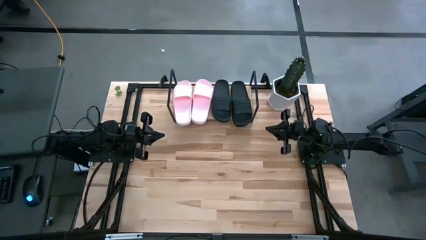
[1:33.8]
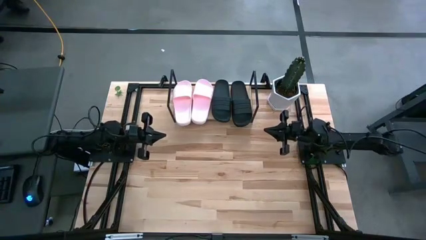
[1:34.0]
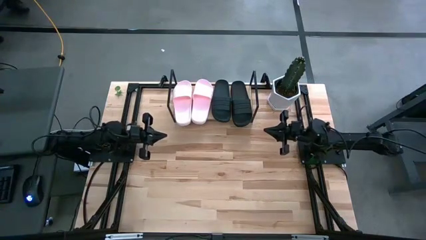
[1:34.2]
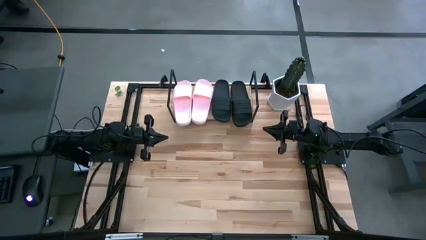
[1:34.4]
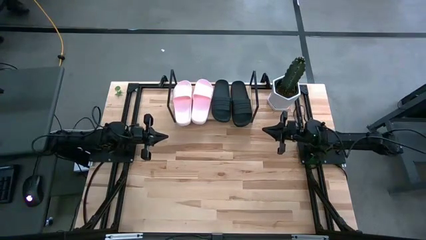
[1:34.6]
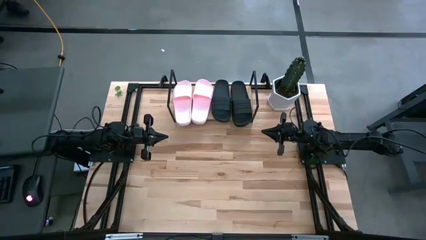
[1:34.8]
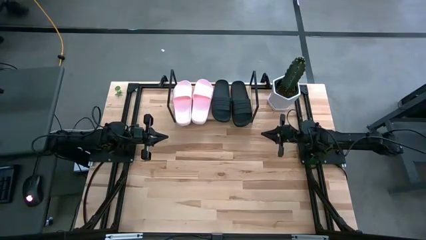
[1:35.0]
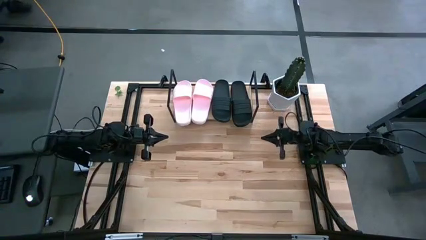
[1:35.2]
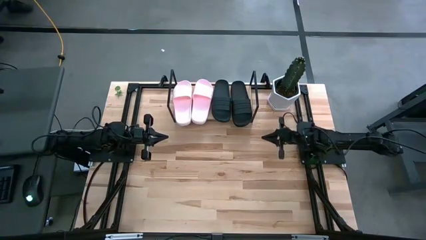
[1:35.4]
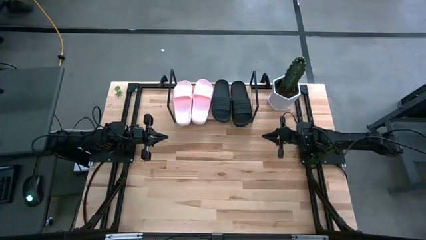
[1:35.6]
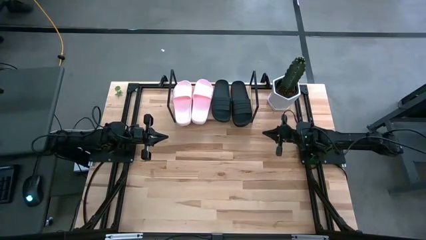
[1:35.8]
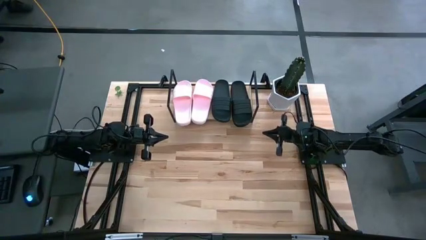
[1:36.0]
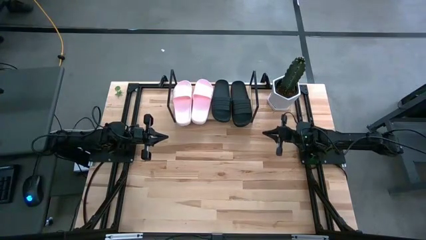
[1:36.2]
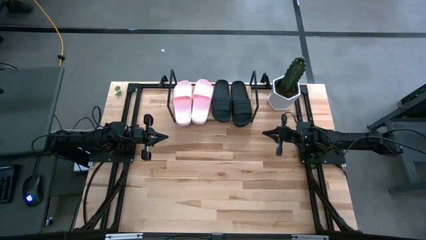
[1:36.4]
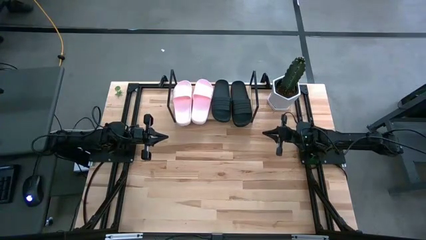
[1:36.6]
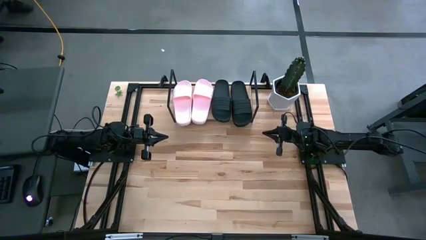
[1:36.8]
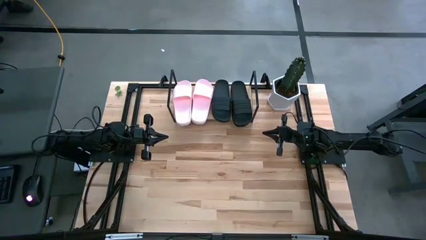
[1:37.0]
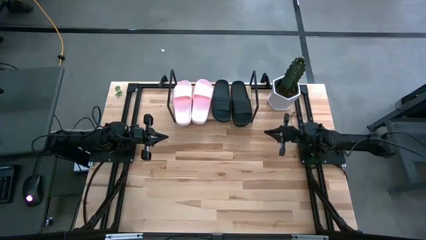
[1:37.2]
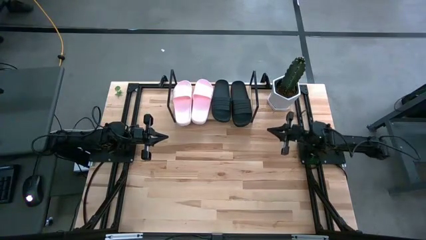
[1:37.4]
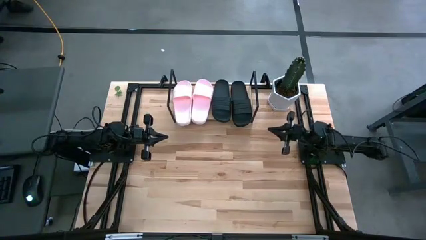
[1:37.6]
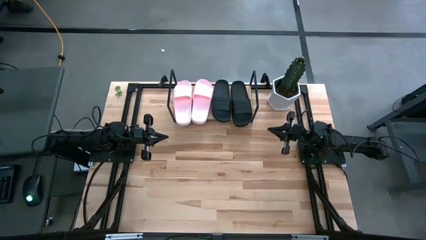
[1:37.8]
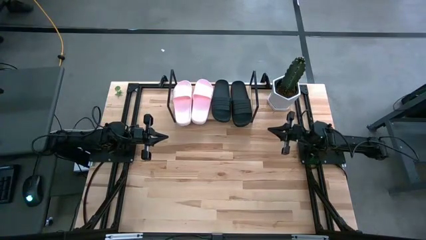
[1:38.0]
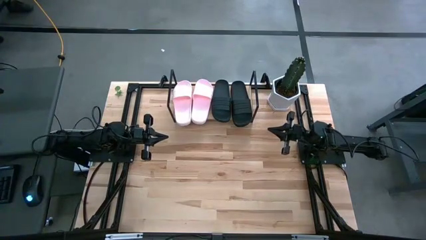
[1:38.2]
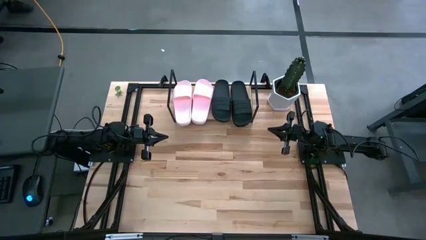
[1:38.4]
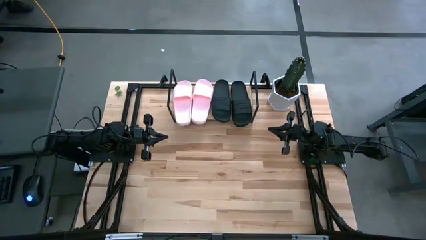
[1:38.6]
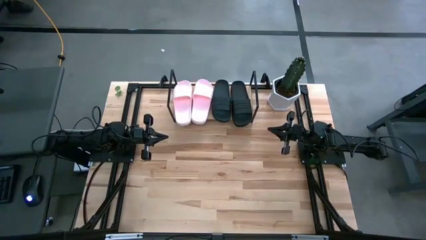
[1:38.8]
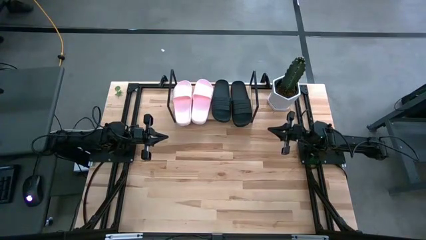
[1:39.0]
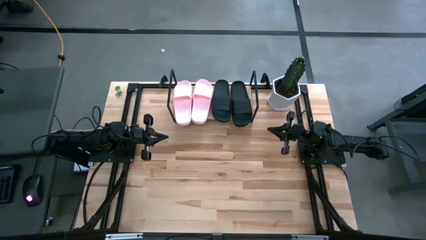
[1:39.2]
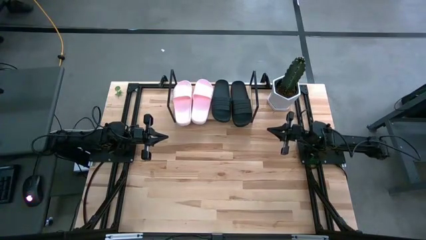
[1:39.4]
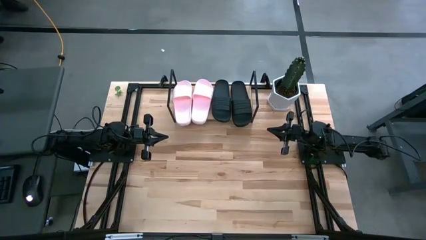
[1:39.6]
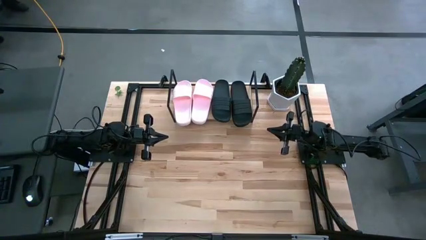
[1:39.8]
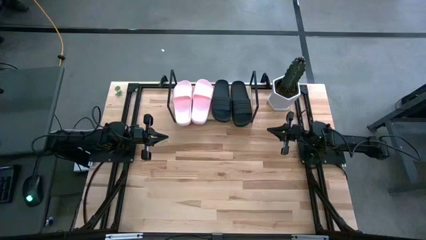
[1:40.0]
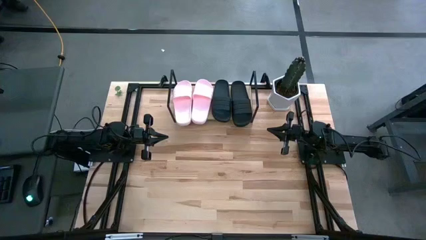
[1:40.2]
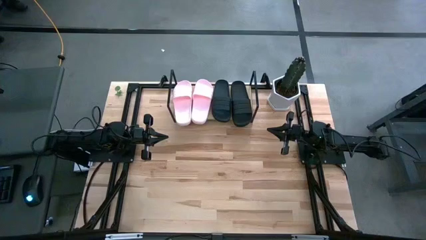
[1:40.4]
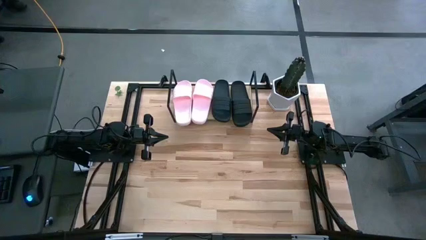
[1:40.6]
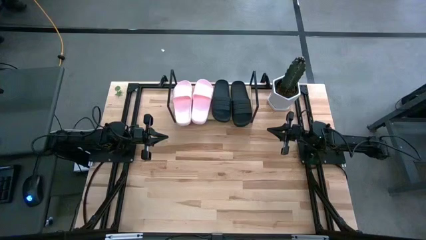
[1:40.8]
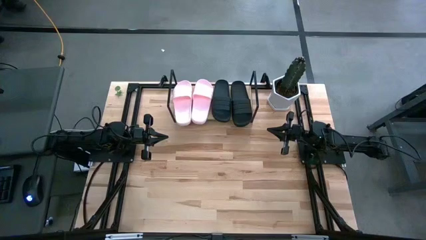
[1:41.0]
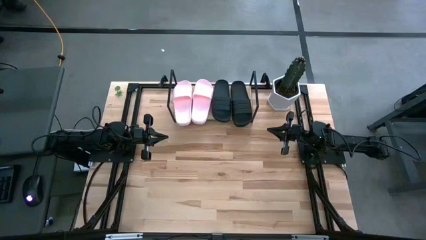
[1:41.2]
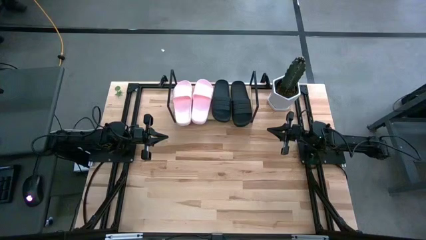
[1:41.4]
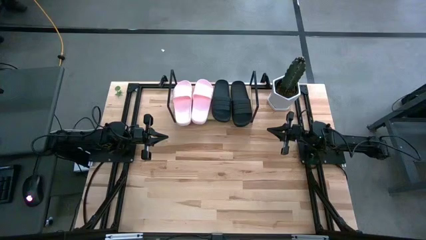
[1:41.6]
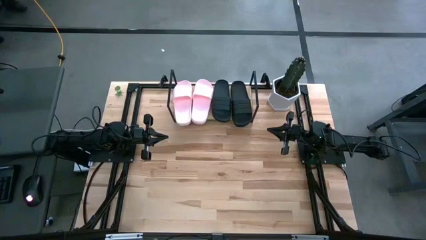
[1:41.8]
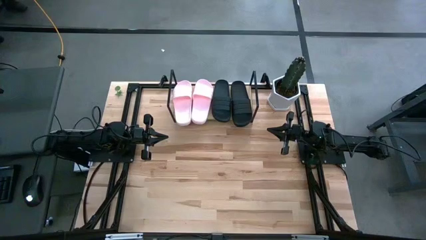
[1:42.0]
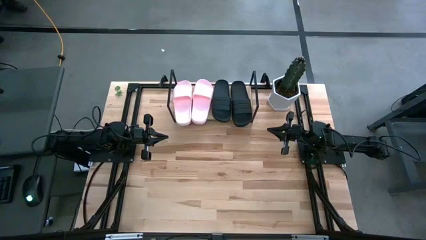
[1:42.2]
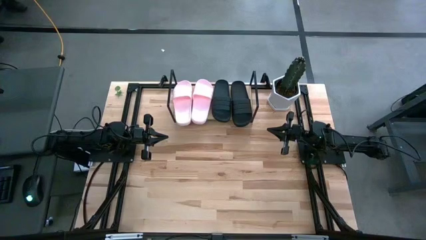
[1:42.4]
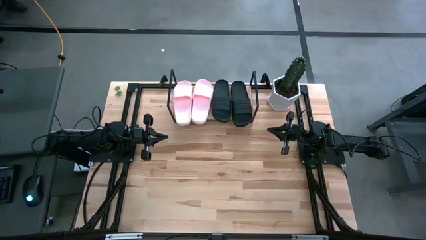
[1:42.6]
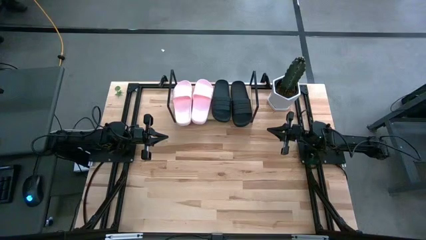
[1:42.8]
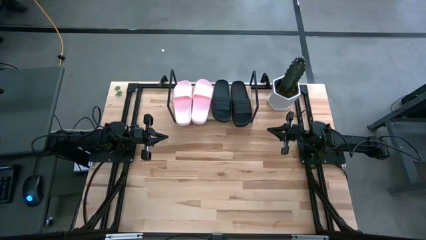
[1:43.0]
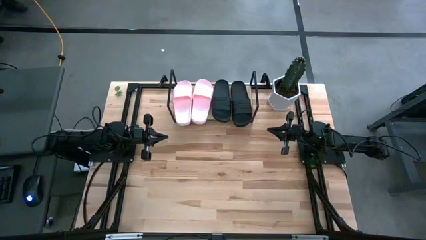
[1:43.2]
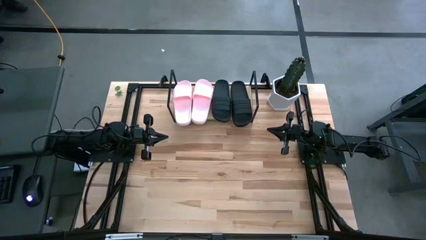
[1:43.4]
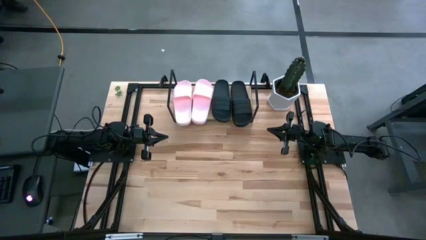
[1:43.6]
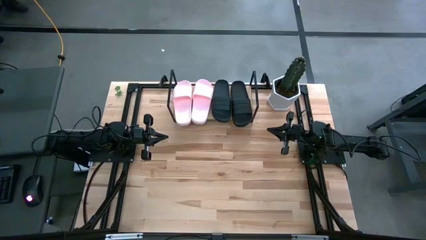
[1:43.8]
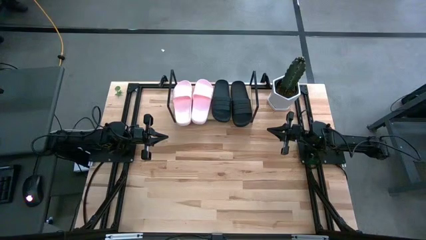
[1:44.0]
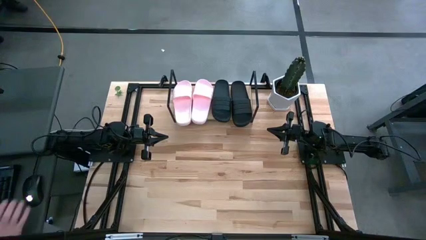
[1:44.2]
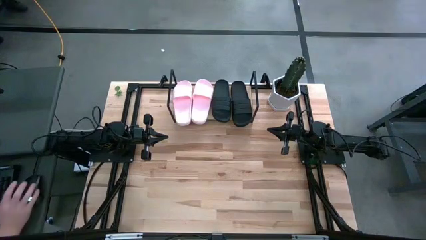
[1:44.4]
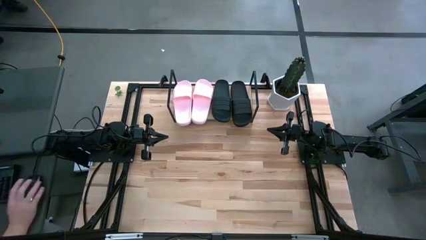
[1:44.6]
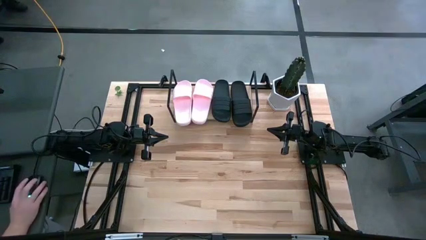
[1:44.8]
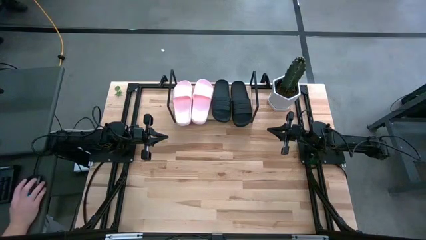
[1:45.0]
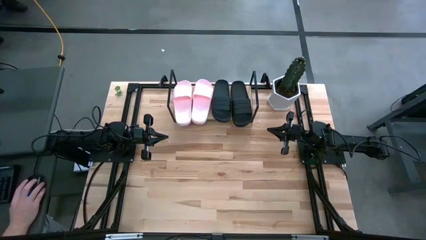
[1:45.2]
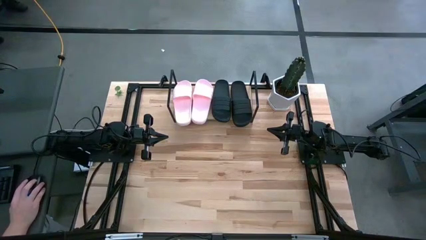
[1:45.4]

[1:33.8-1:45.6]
Task: Pick and place slides into the shelf
Return to Home Position
